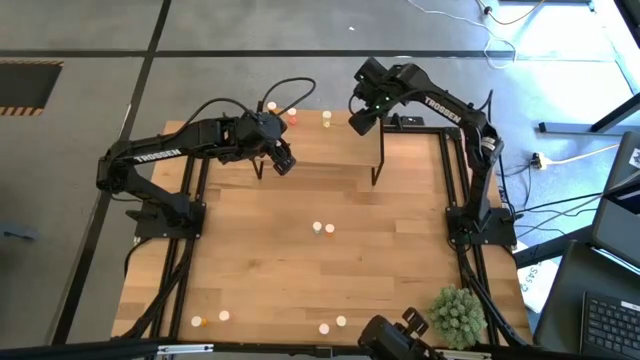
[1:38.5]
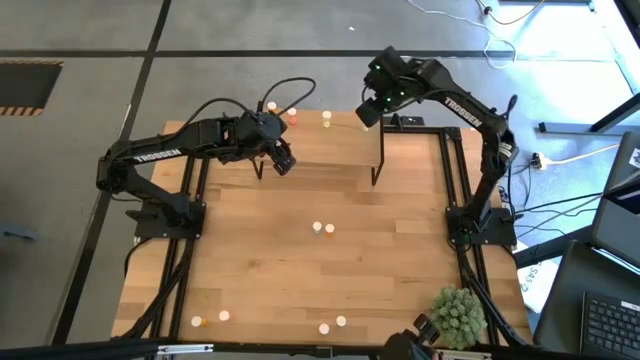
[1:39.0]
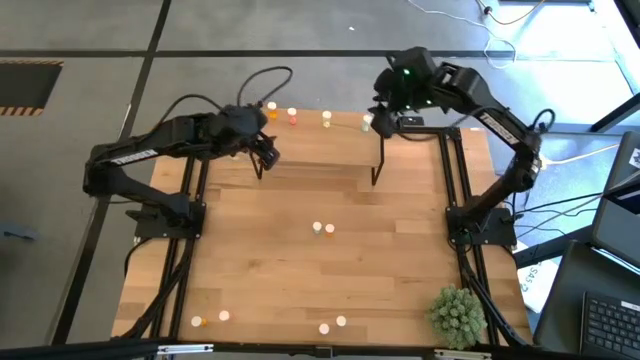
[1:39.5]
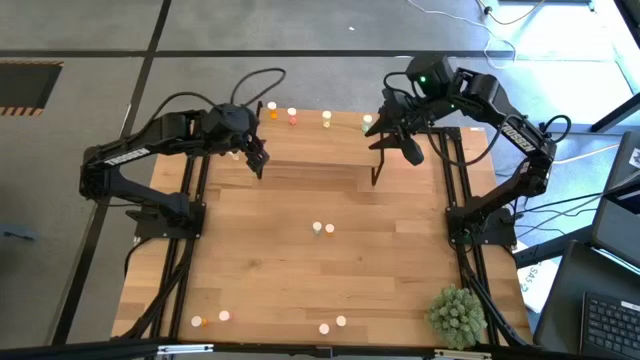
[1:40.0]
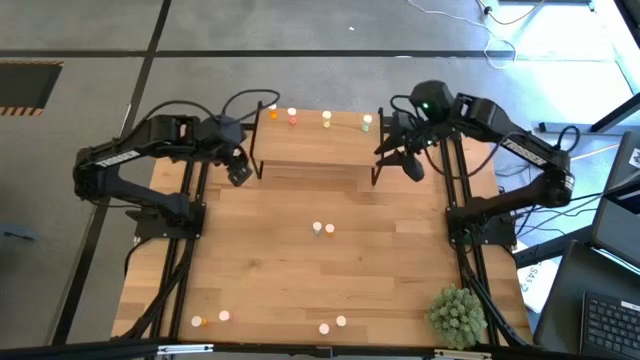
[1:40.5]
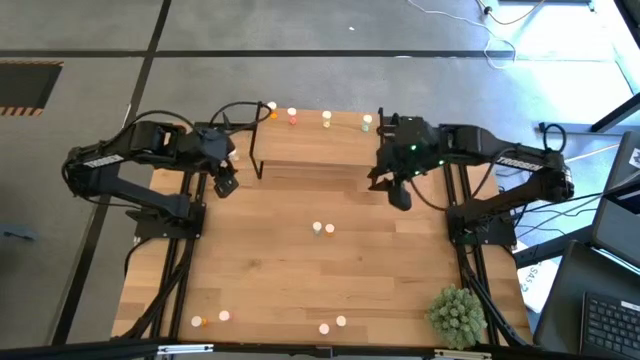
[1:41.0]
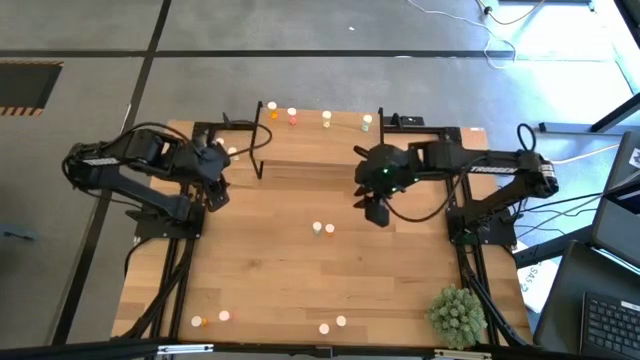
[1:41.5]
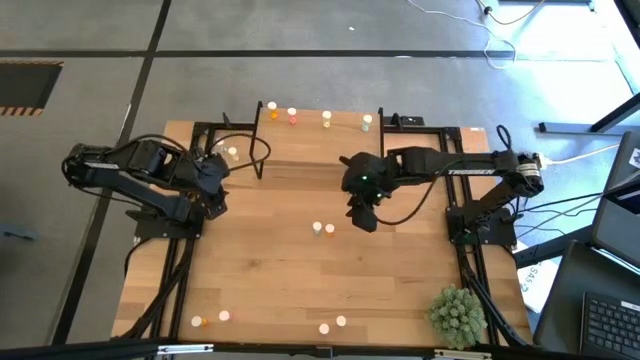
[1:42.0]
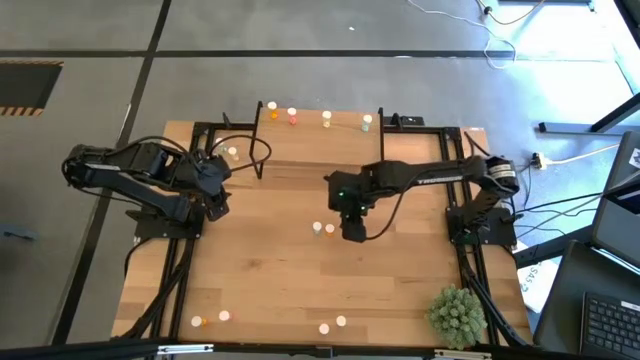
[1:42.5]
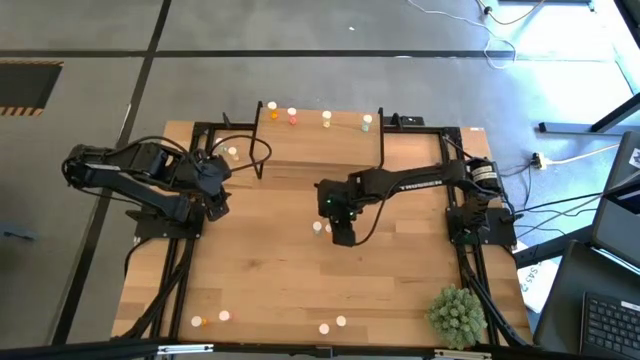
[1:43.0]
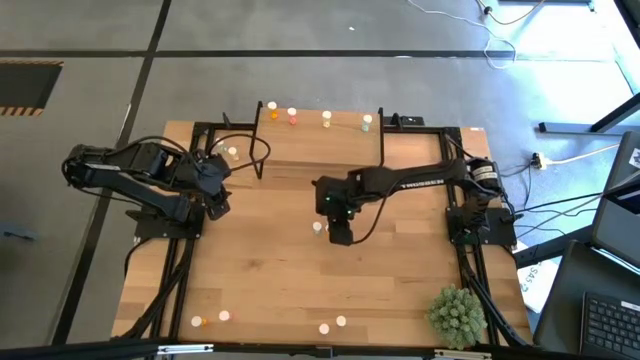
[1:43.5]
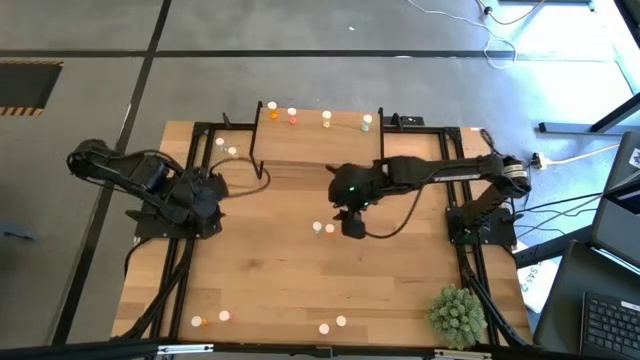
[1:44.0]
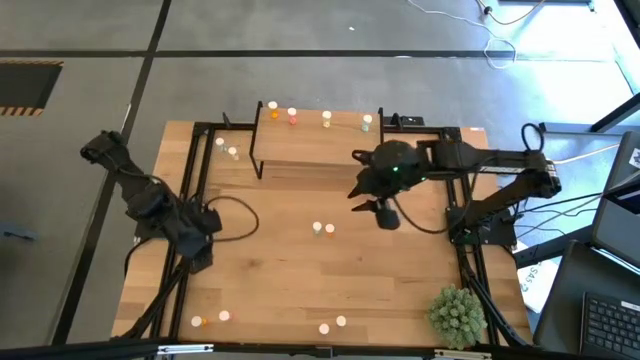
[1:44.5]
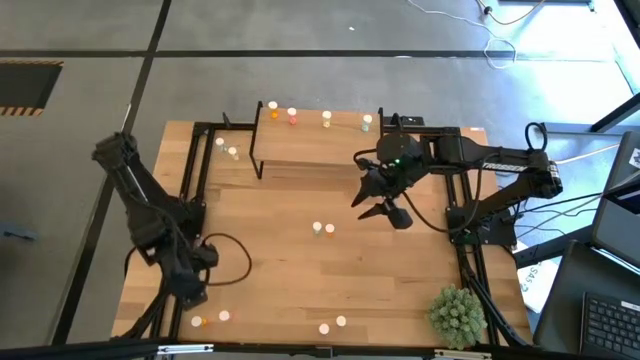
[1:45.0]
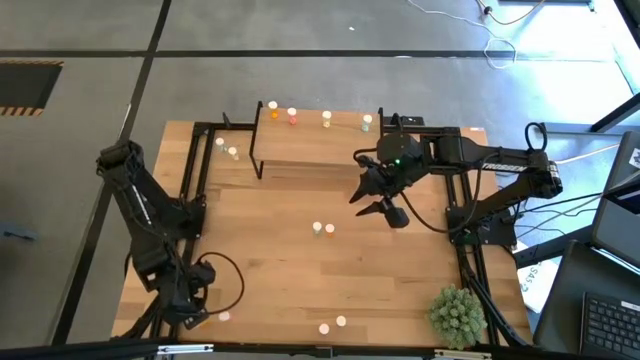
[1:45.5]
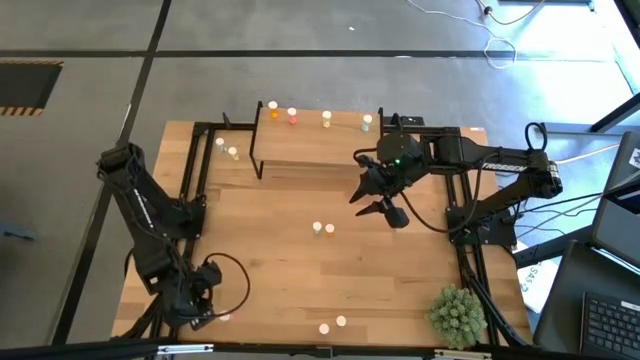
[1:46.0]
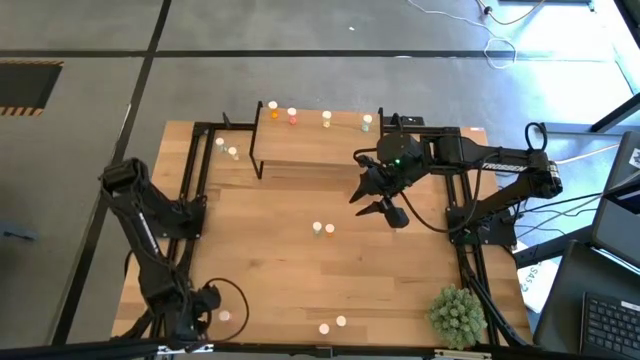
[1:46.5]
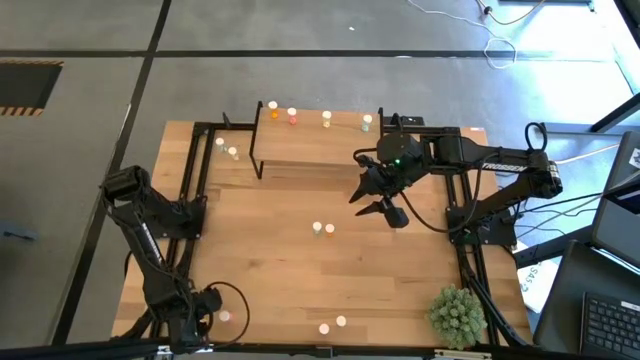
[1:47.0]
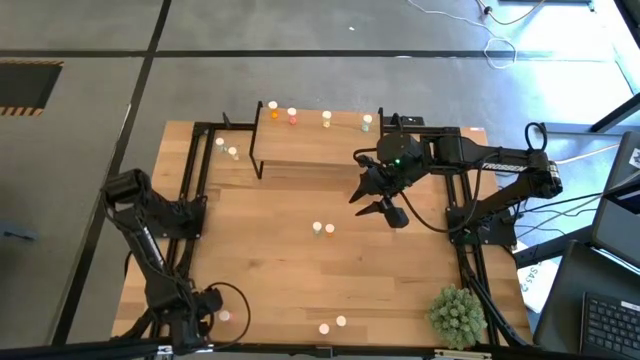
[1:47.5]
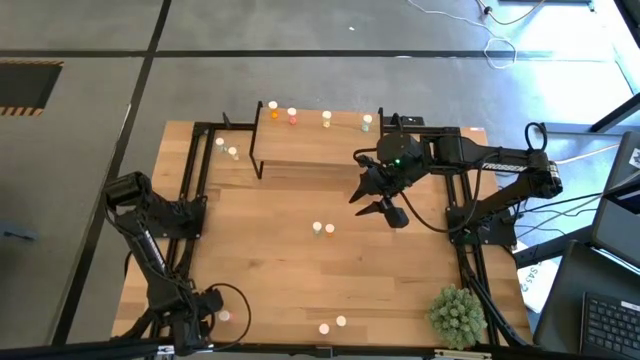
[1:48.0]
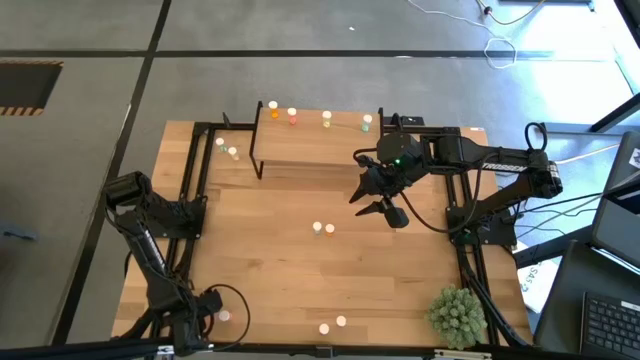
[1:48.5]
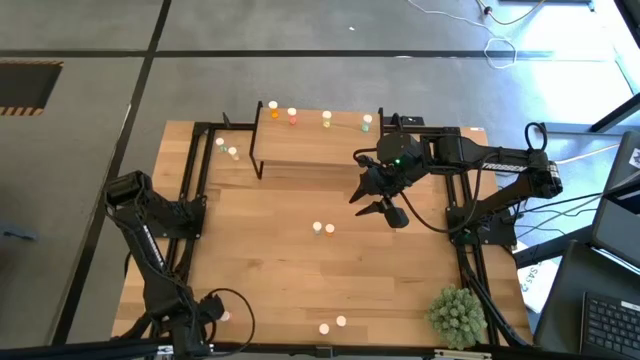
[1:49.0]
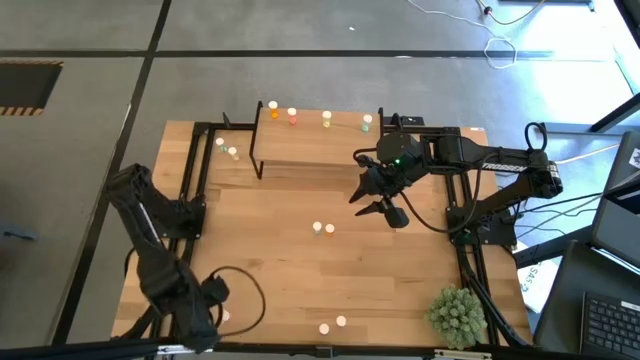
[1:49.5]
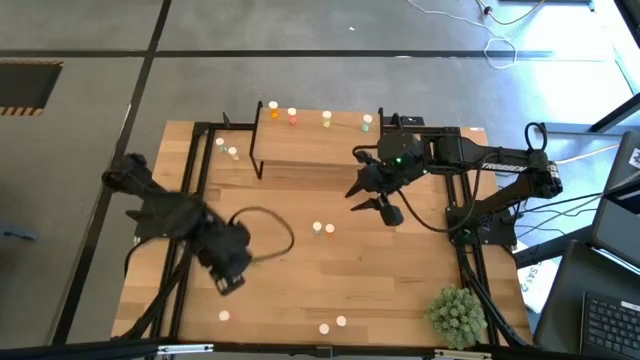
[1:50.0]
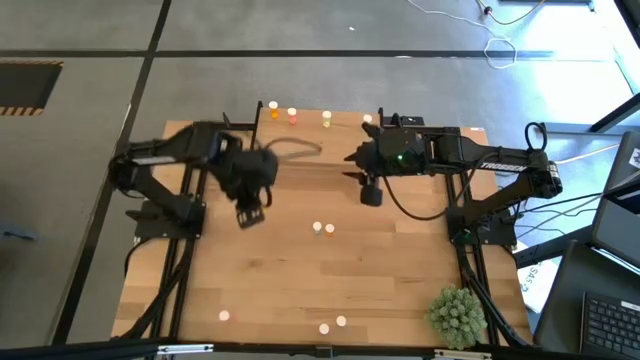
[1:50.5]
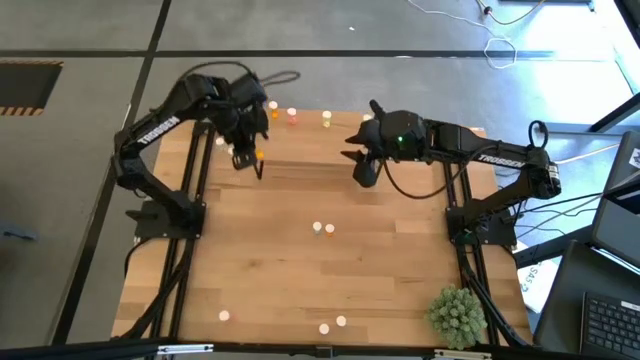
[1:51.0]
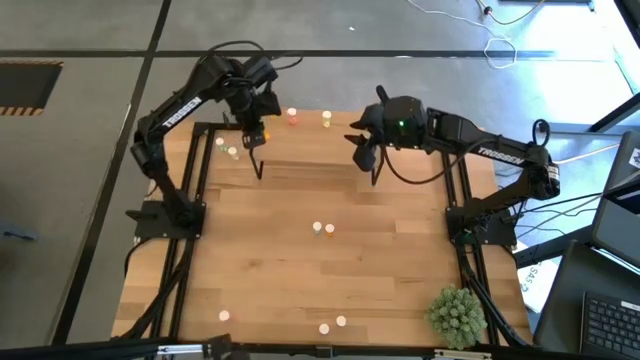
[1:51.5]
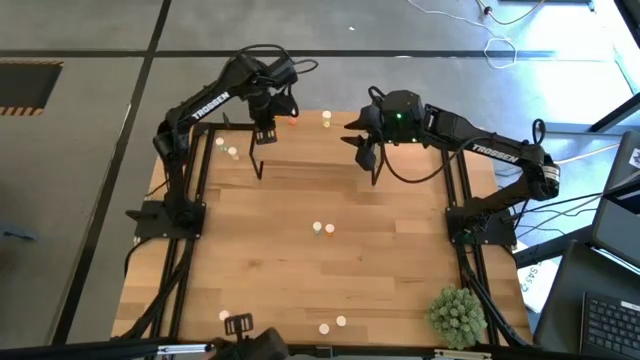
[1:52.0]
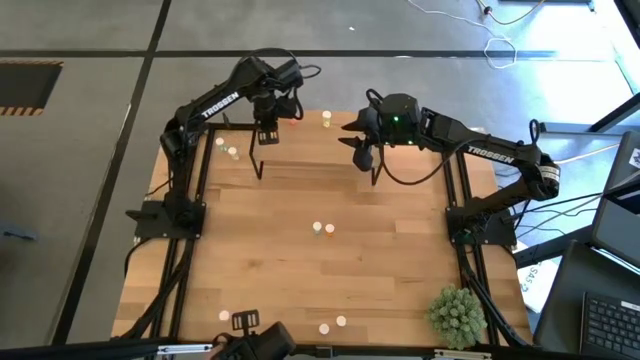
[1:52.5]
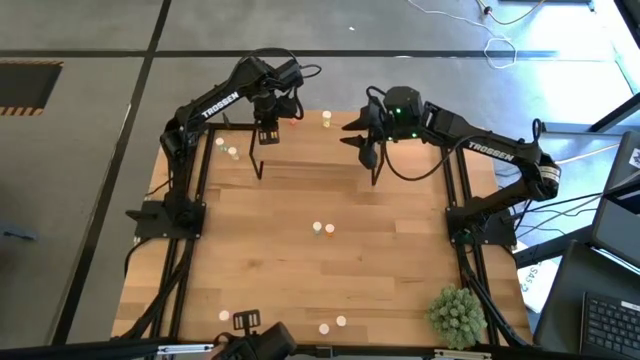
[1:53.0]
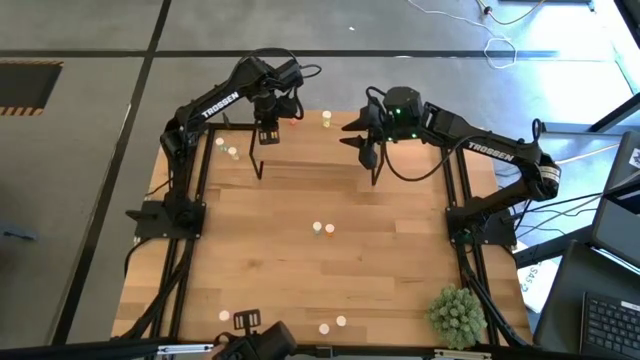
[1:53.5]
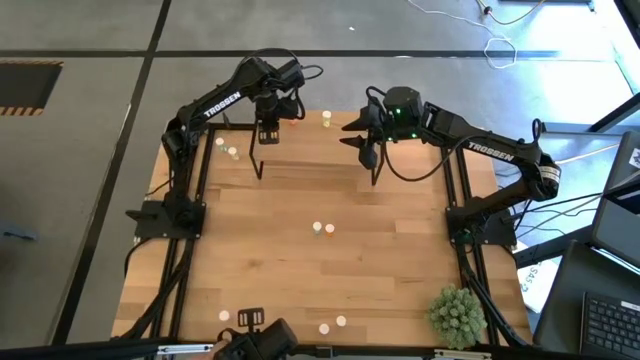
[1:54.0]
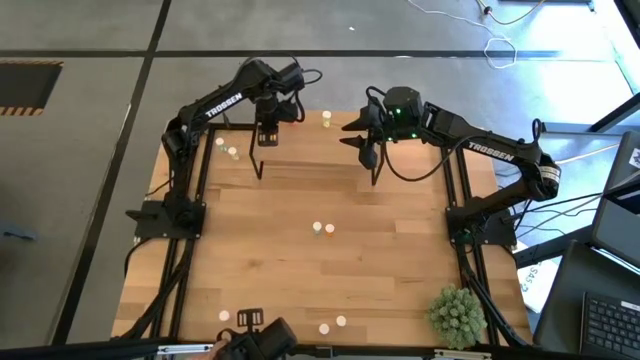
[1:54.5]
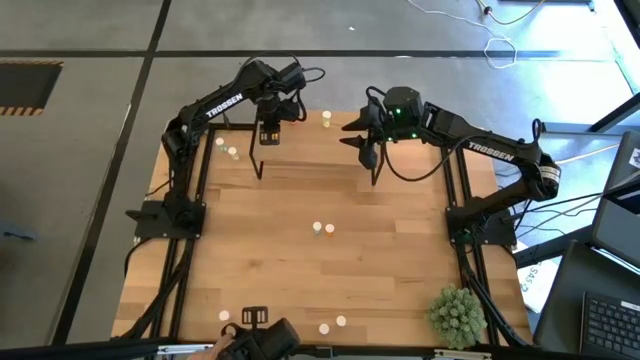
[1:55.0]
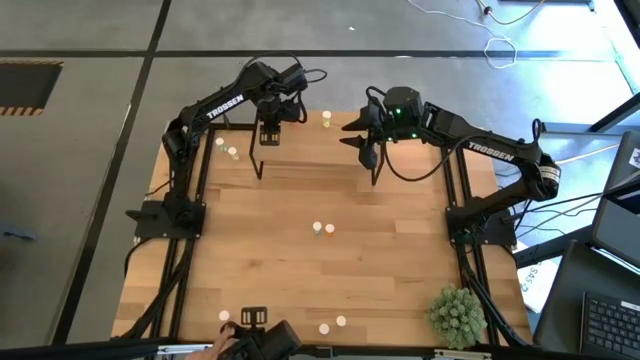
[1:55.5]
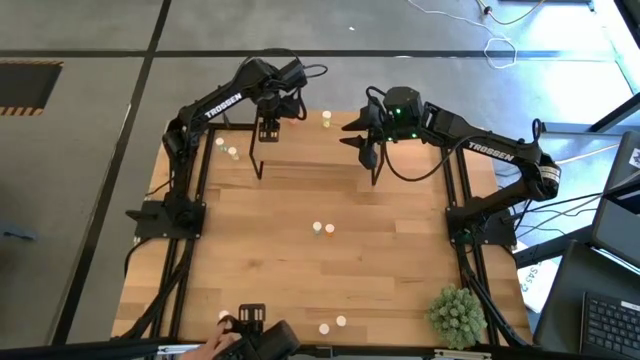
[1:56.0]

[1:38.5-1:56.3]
Task: Pick and place medicine bottles onto shelf by color
Put the bottom orange pill bottle on the shelf aligned with the other orange pill bottle

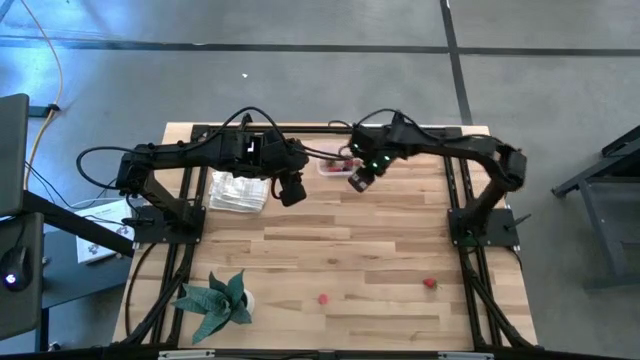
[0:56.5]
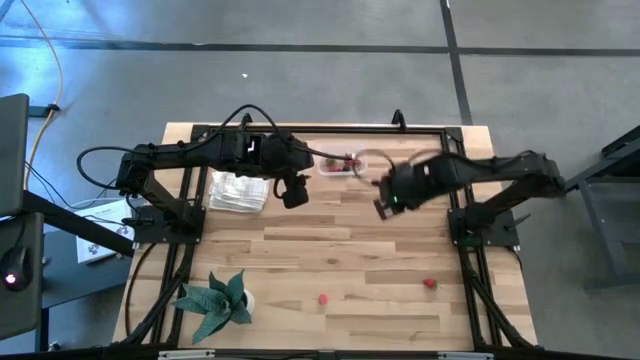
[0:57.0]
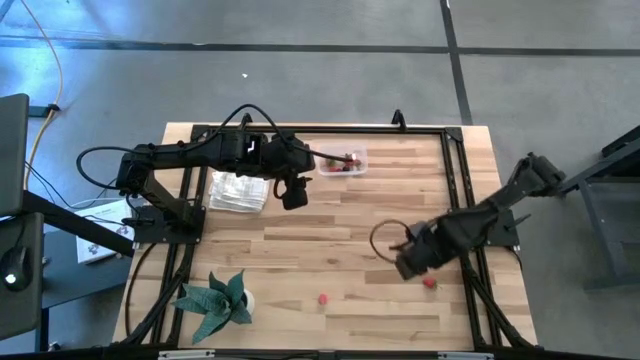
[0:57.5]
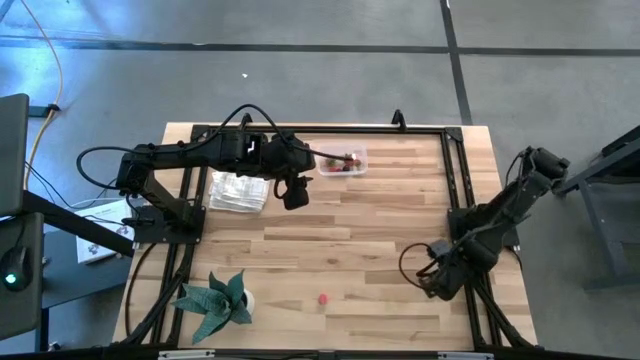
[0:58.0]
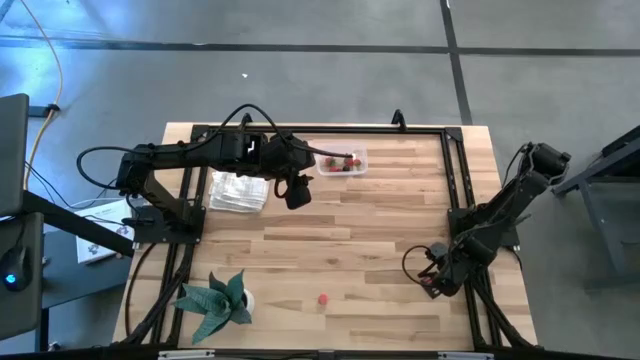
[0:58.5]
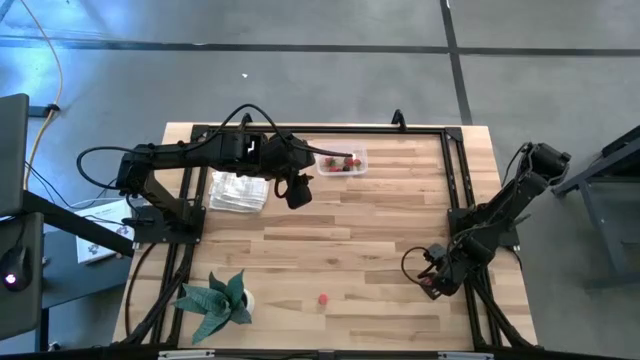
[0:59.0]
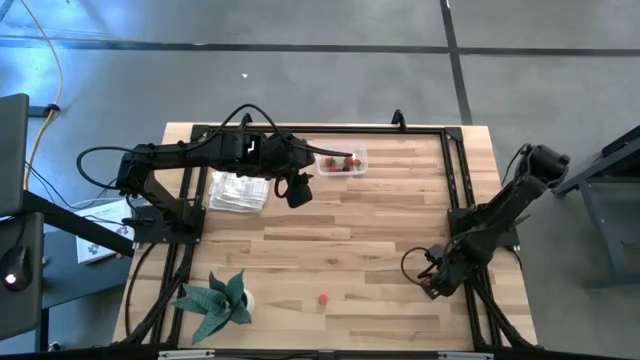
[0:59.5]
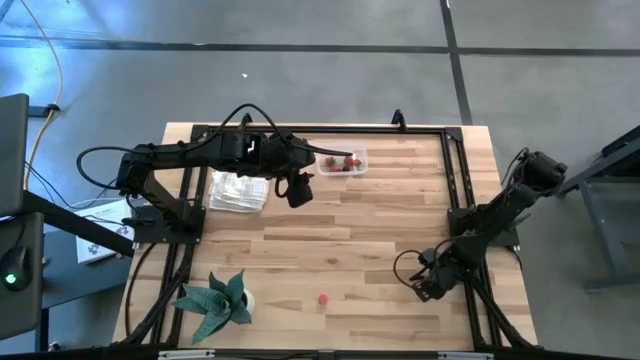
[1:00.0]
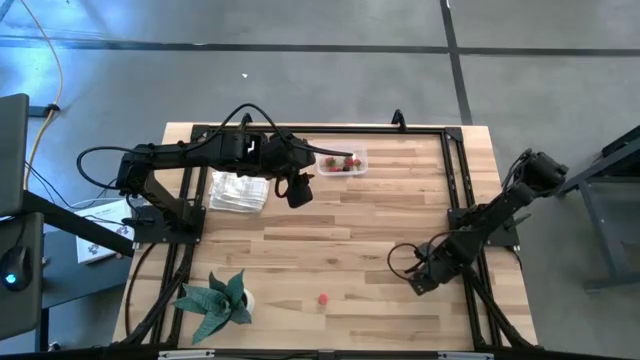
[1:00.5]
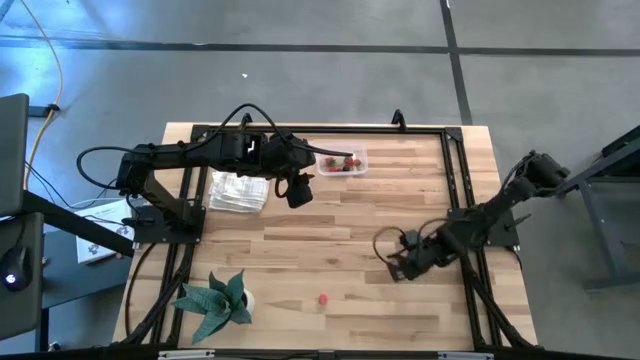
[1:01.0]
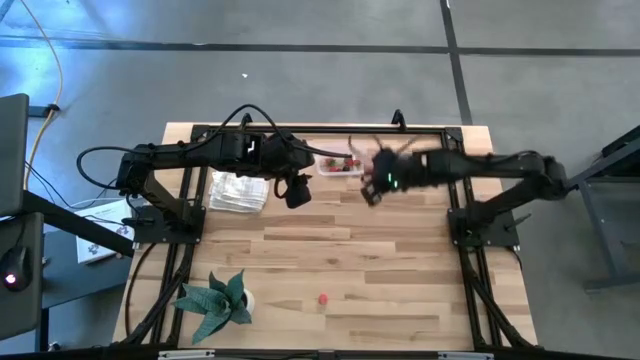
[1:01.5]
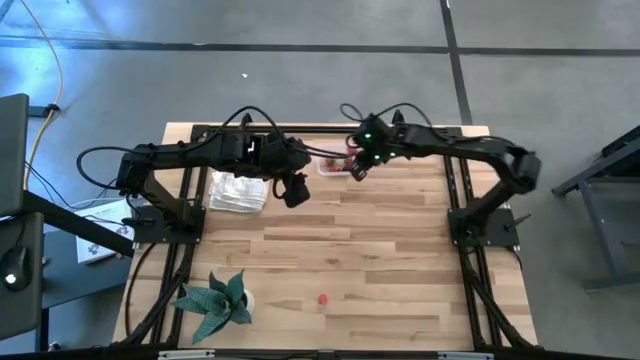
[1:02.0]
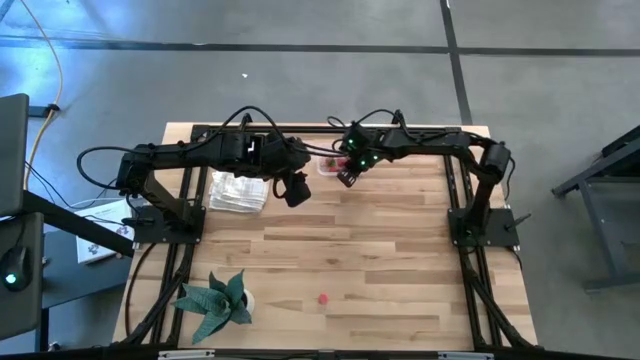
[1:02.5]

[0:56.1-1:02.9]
Task: Pick and placing Produce into tupperware
Put the red strawberry into the transparent container
